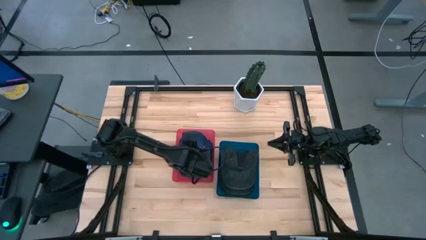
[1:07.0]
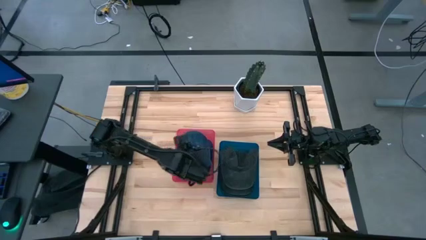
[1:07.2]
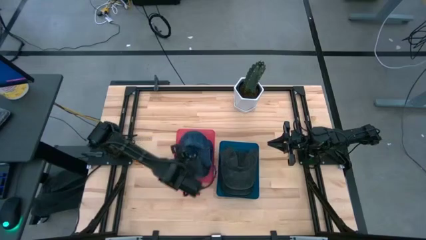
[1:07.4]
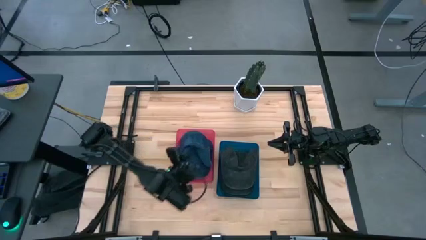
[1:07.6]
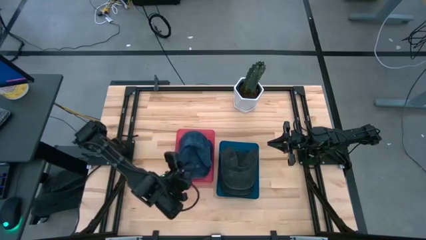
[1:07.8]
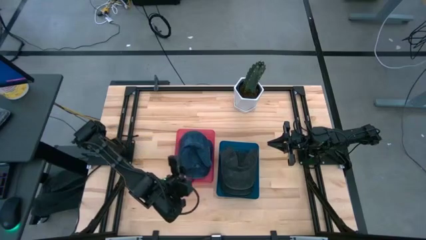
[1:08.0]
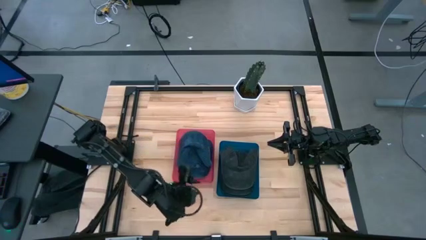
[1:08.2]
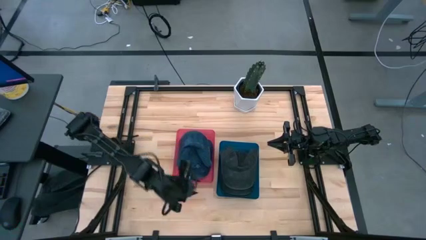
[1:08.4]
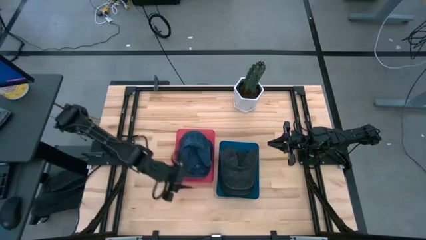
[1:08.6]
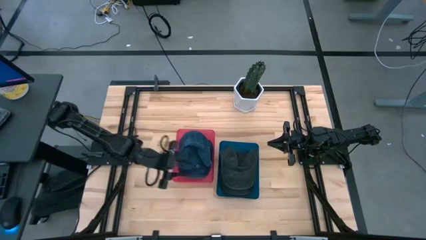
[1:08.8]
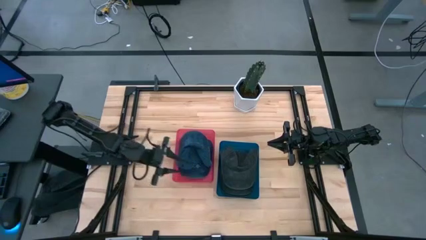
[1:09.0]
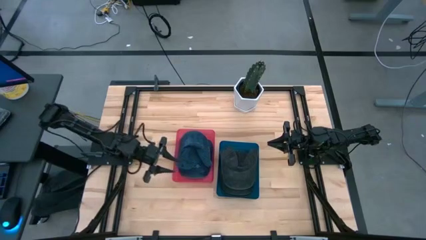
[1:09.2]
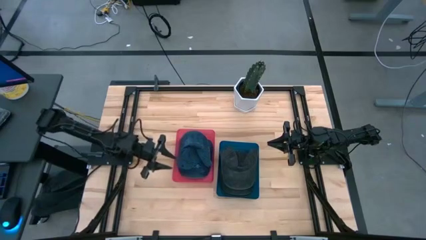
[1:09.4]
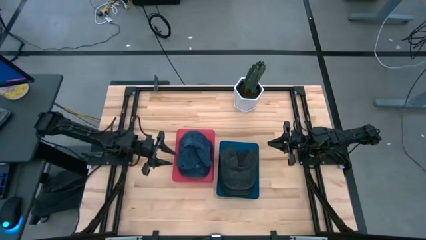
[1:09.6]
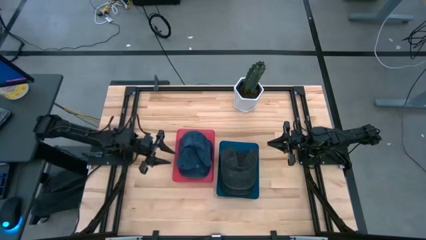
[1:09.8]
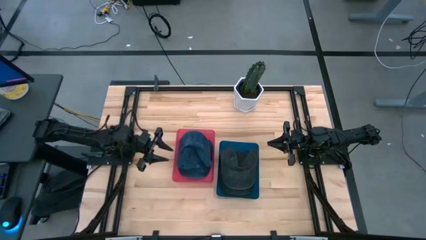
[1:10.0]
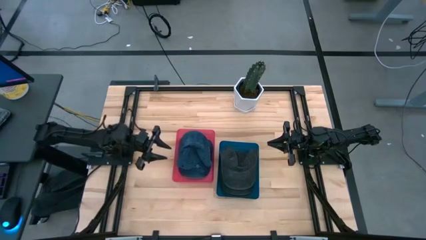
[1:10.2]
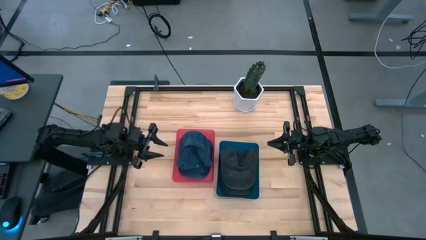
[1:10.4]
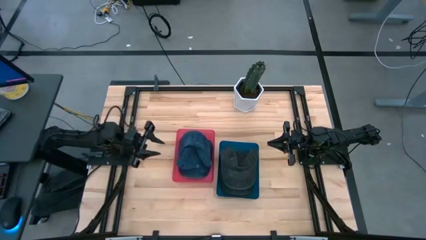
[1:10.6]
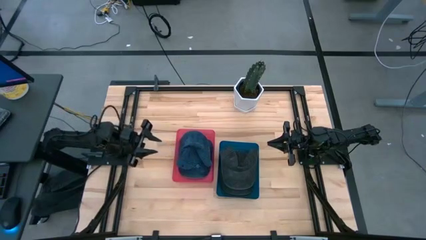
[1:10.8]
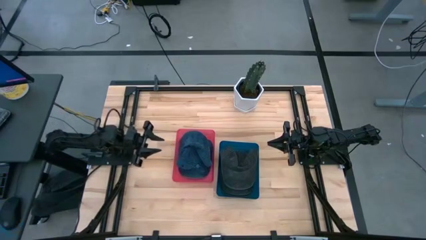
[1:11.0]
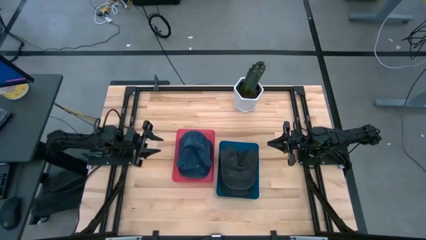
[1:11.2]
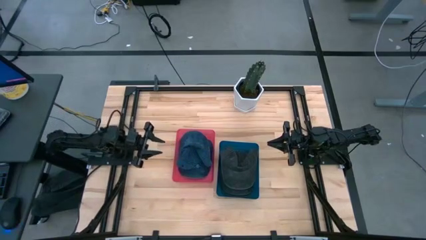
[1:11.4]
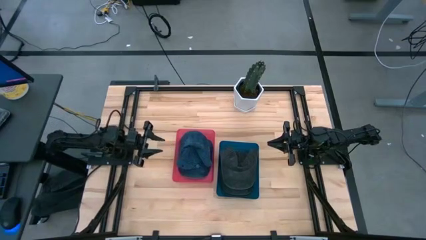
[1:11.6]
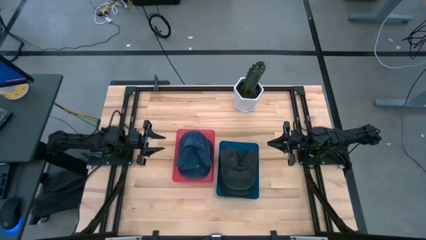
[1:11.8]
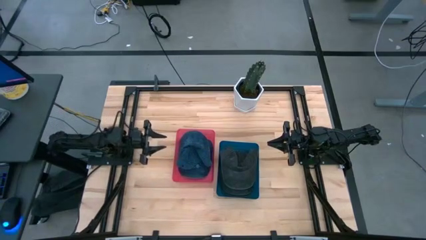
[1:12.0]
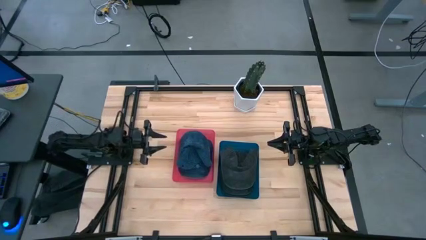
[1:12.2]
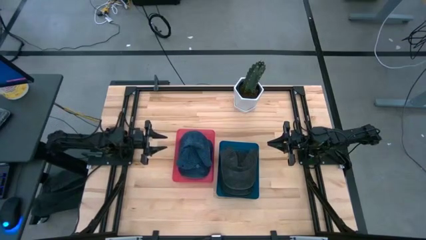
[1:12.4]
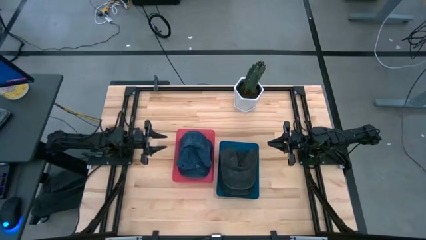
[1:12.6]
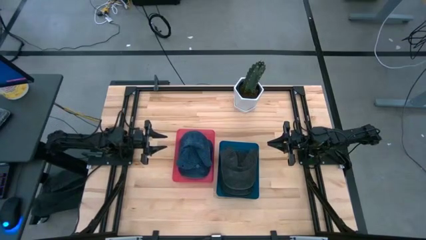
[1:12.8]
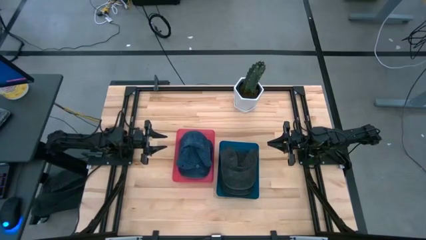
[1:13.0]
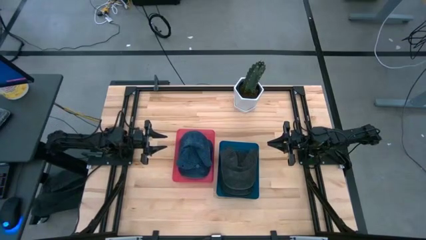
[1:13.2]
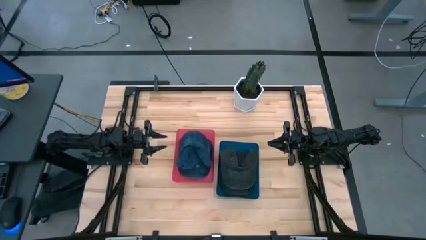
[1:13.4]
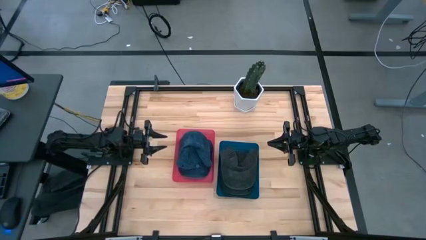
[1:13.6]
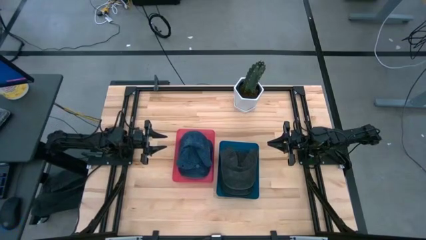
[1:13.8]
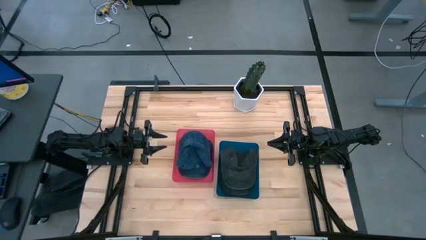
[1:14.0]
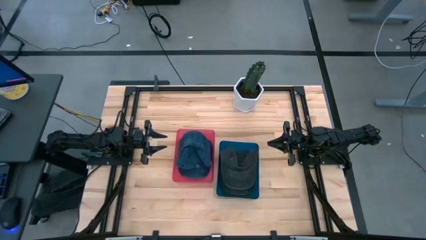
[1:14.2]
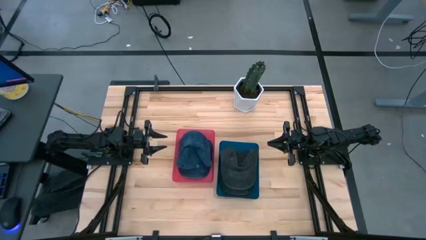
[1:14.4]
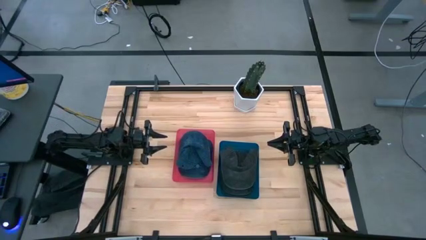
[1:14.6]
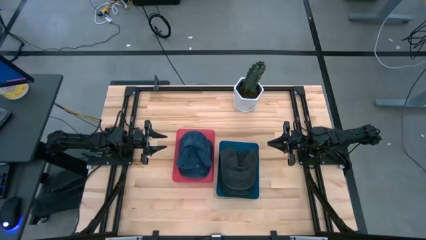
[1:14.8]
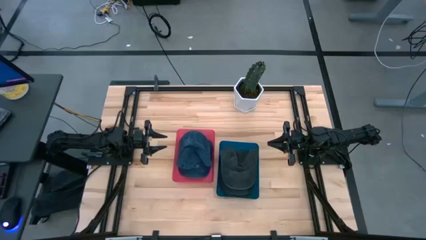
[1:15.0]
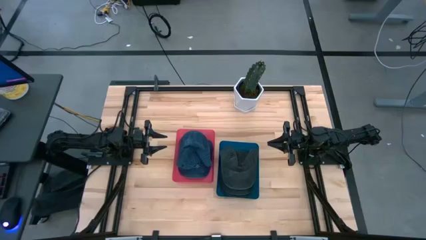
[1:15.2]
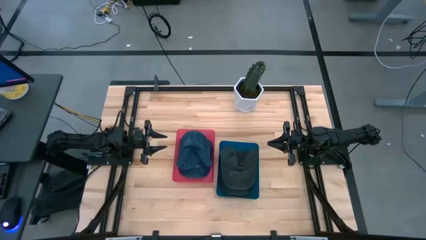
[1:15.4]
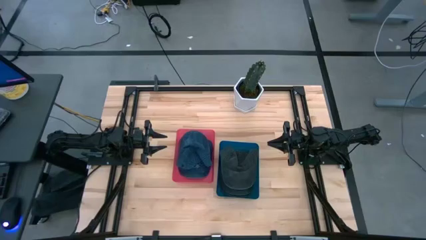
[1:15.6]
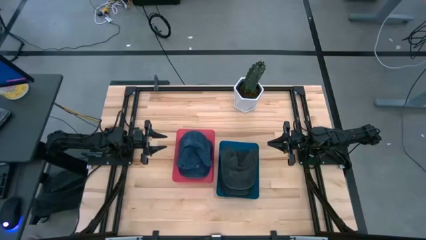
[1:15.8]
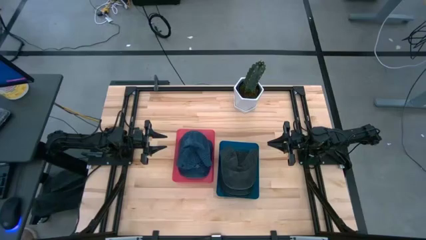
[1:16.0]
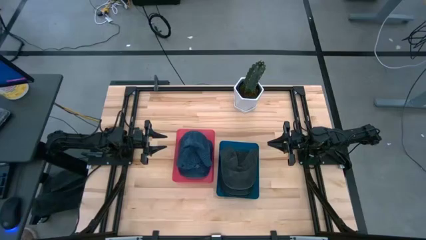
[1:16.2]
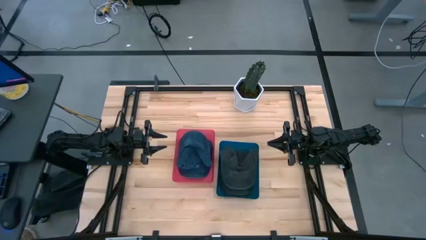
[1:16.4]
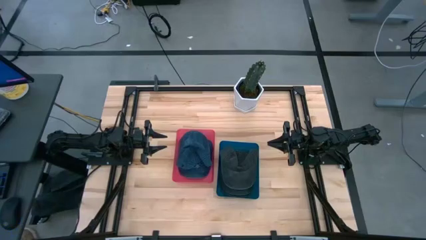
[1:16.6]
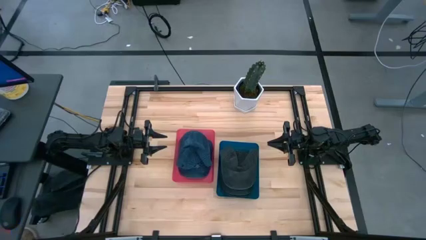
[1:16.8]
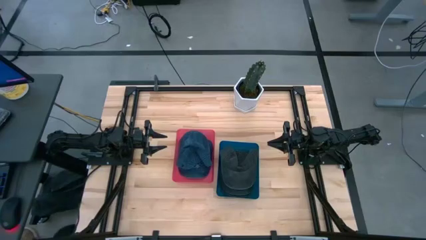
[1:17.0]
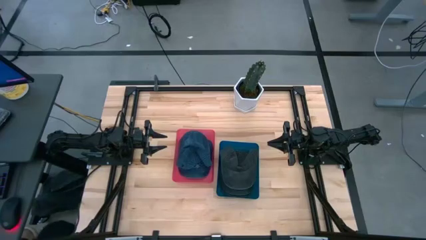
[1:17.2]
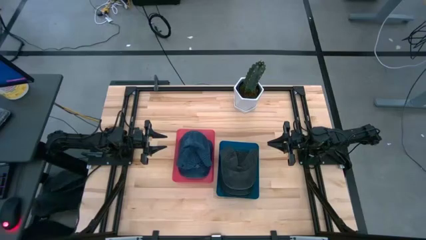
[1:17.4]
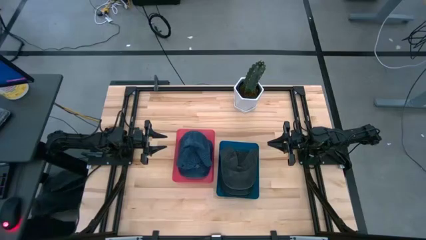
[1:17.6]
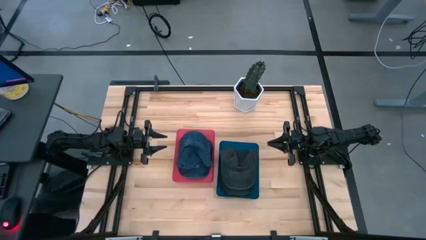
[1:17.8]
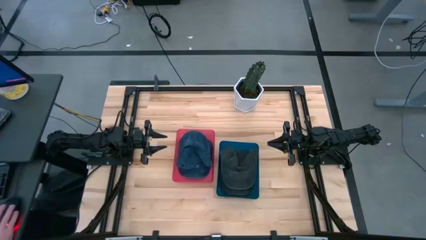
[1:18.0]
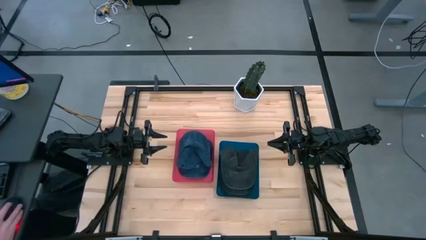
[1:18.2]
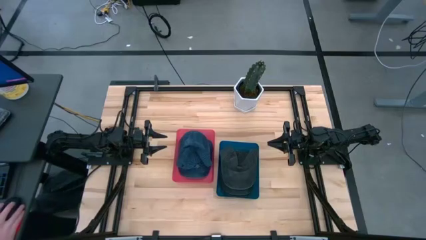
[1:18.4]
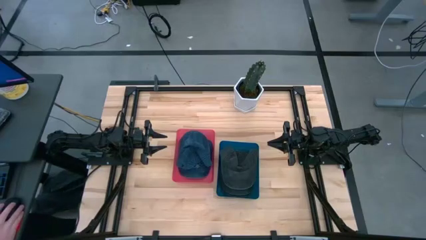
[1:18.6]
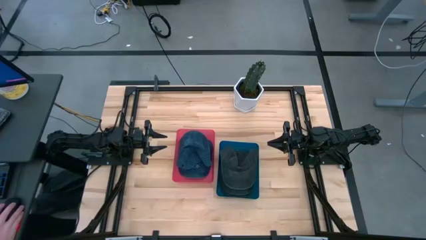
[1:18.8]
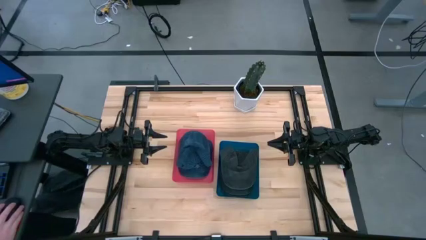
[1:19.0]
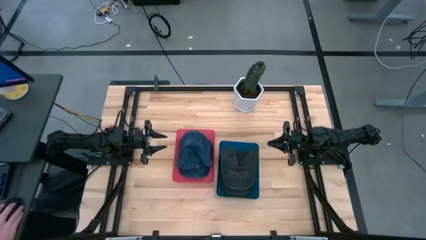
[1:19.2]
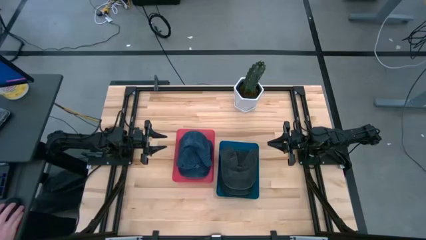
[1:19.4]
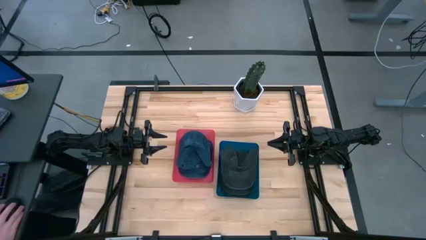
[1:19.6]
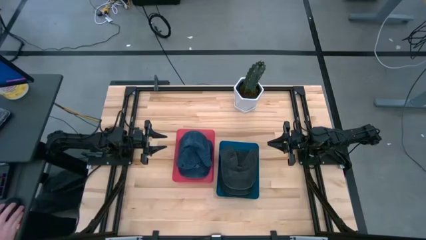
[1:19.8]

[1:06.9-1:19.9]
Task: Pick & Place hat
Return to Home Position
